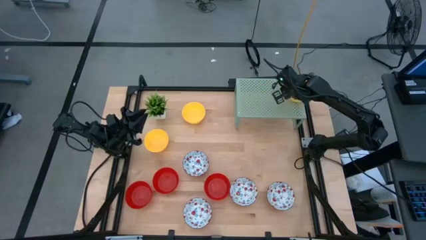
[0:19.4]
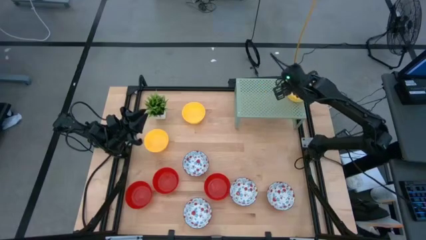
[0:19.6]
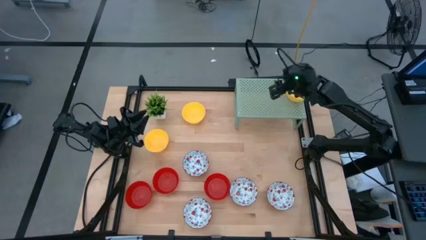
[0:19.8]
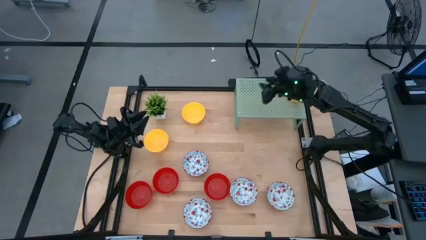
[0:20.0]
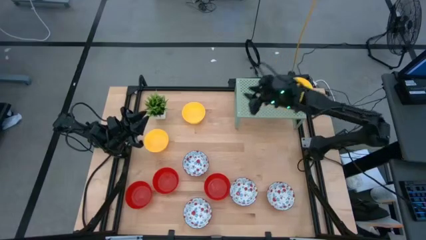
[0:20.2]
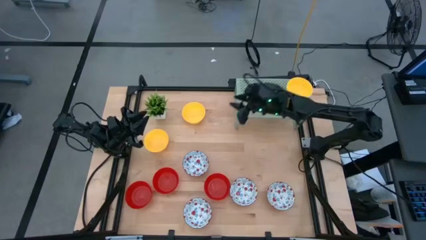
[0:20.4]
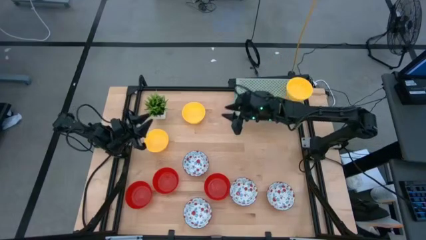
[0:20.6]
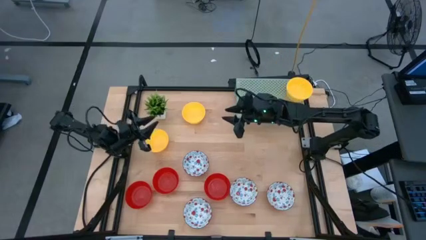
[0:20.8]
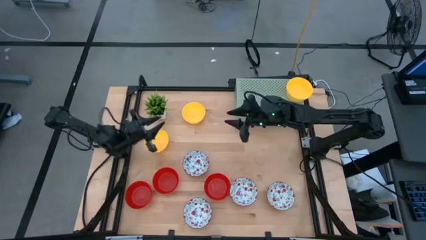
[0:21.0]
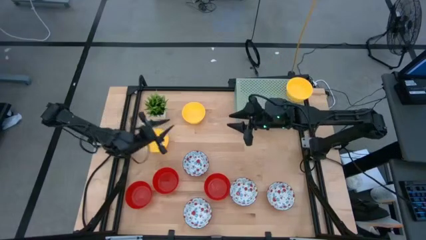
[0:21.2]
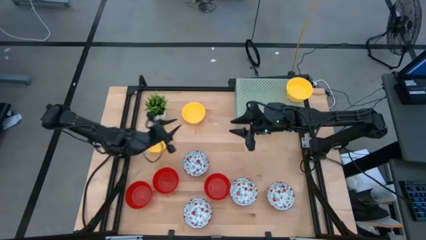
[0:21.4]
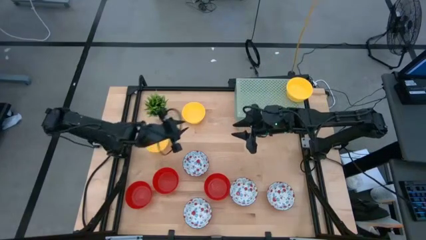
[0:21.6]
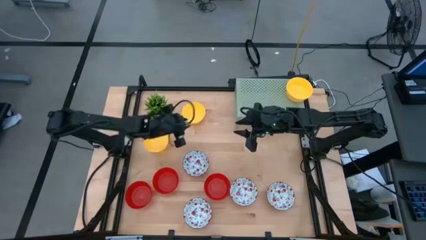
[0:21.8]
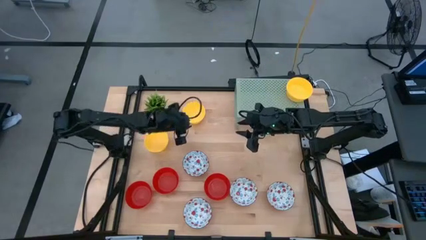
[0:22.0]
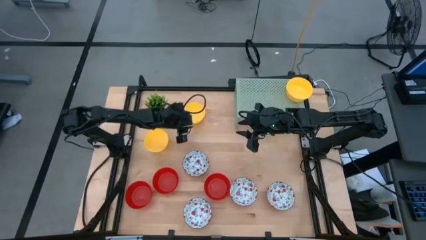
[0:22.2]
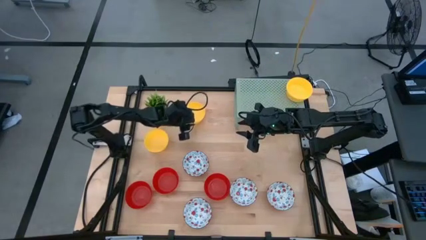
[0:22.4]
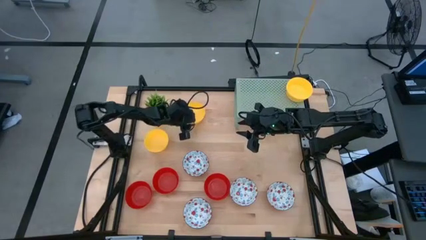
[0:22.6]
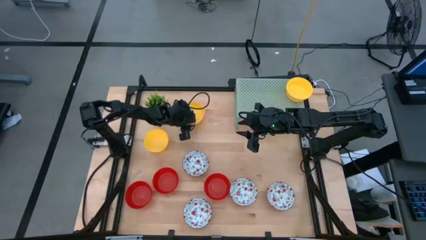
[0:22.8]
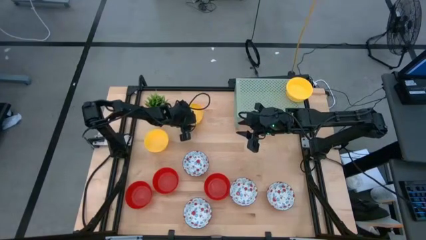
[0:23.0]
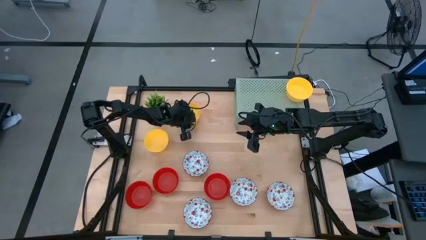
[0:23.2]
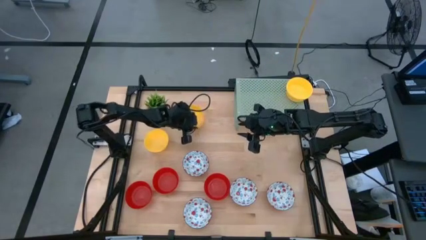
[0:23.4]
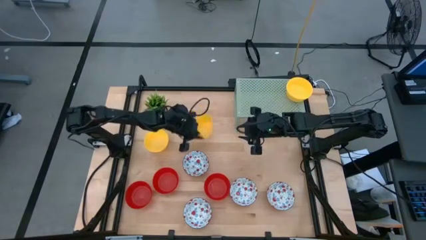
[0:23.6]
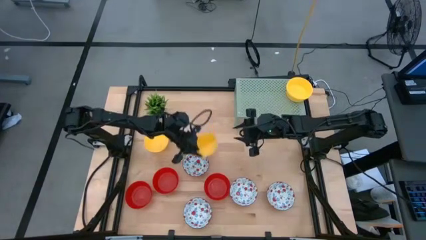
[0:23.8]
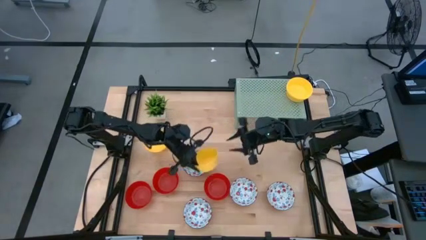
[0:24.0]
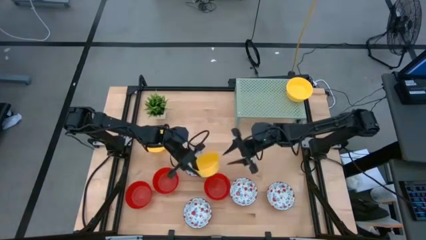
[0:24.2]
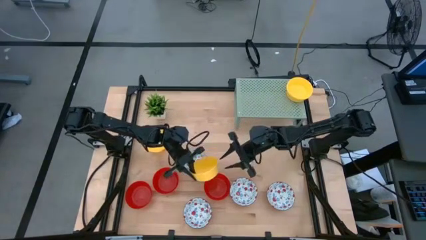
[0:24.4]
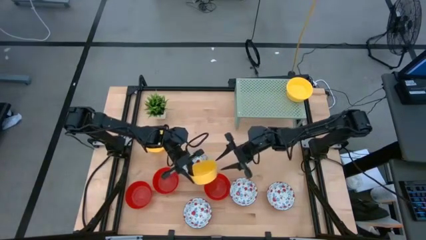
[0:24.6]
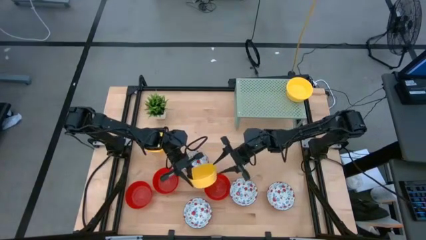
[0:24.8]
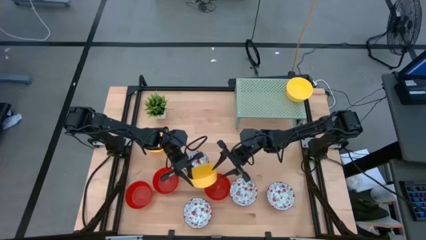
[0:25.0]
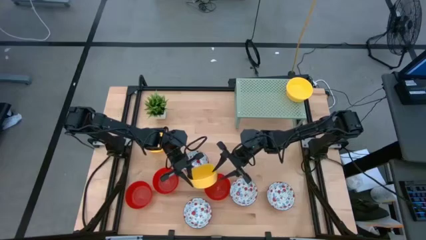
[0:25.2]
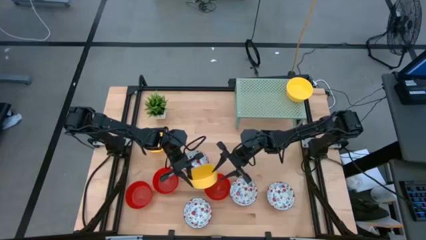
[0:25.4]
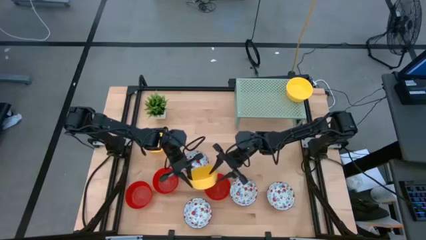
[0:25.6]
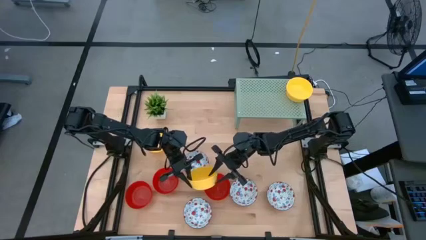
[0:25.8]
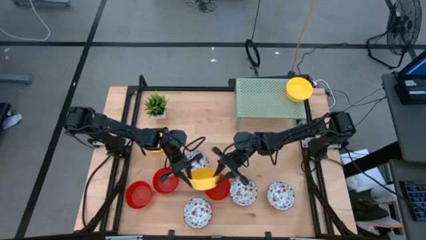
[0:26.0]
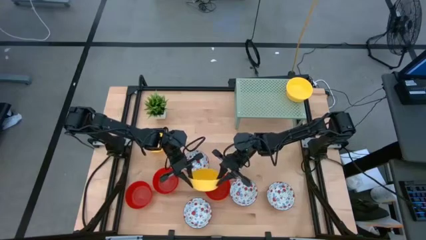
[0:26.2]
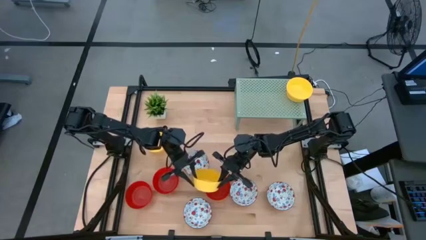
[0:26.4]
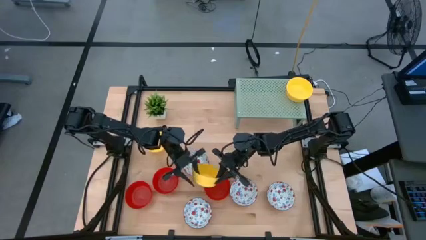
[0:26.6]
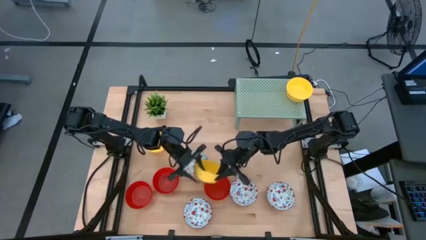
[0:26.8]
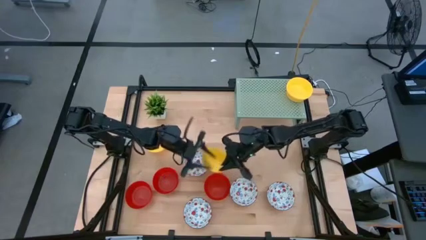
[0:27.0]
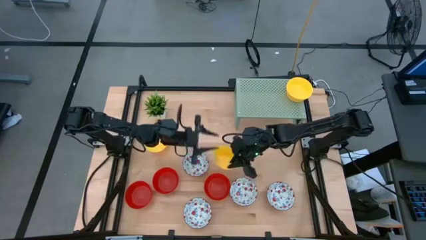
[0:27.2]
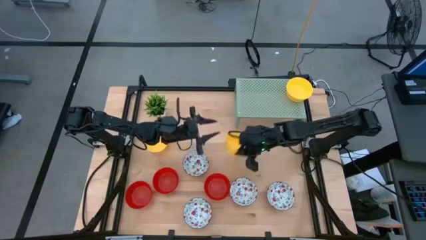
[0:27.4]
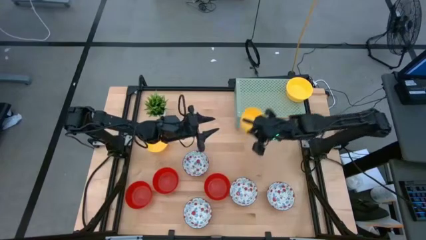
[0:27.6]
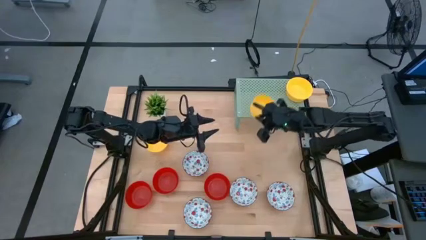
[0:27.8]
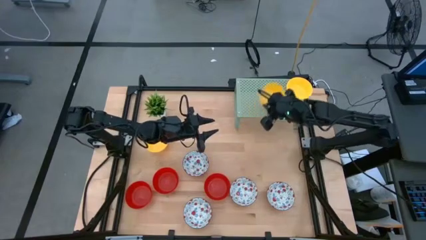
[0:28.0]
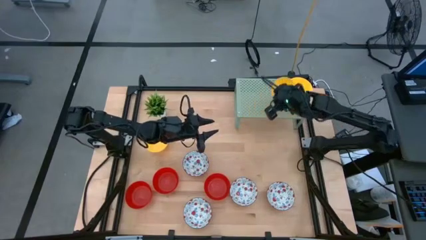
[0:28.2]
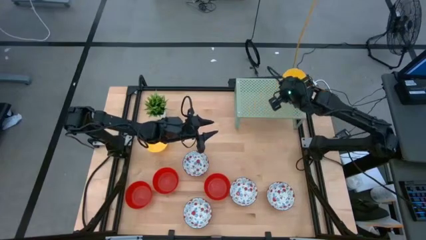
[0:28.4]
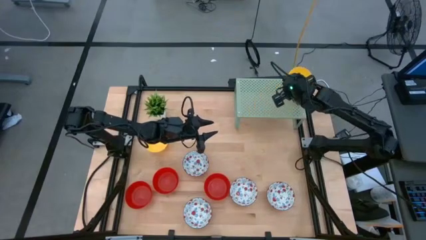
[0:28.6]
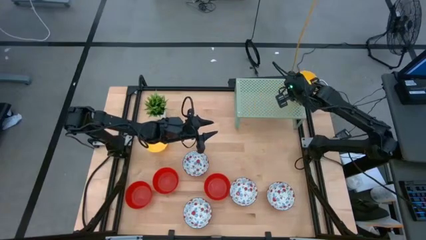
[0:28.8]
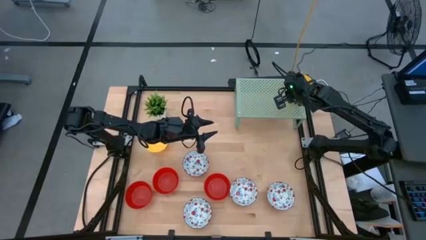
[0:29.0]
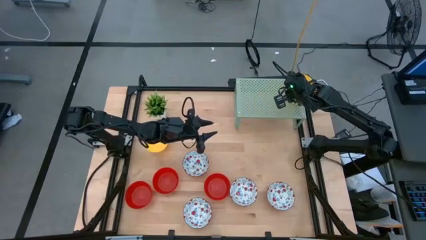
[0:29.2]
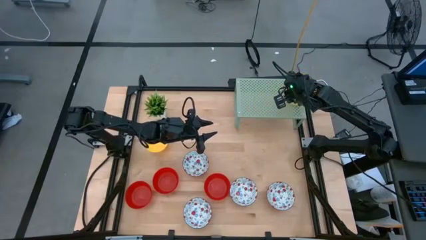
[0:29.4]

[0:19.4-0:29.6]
Task: Pick & Place Mini bowls
Stack the yellow bowl on the stacked yellow bowl on the shelf

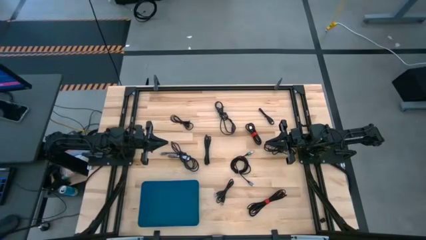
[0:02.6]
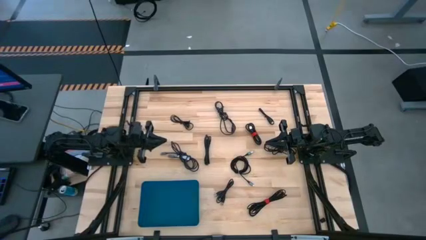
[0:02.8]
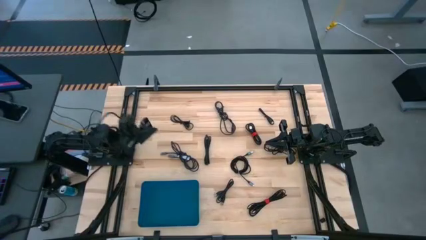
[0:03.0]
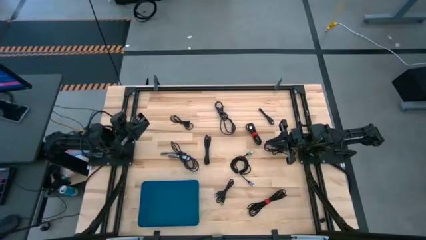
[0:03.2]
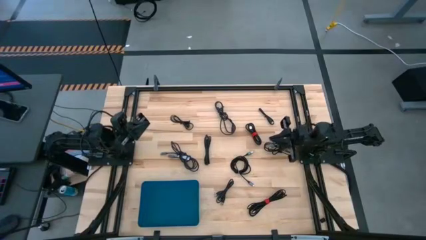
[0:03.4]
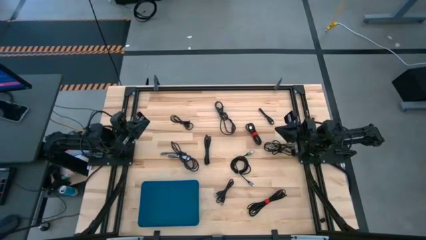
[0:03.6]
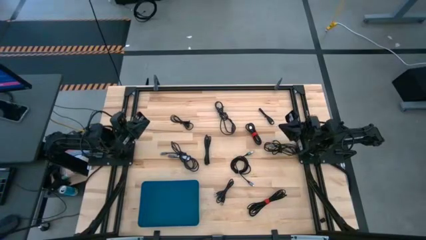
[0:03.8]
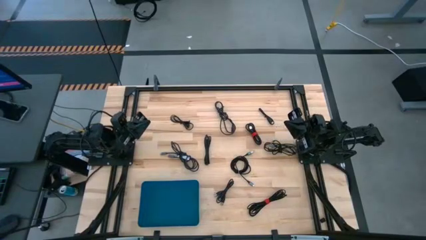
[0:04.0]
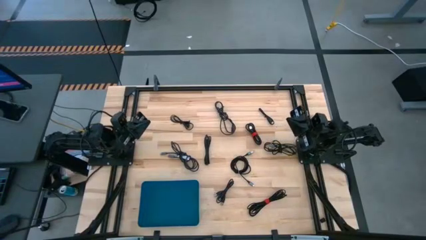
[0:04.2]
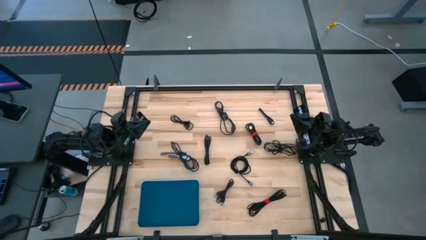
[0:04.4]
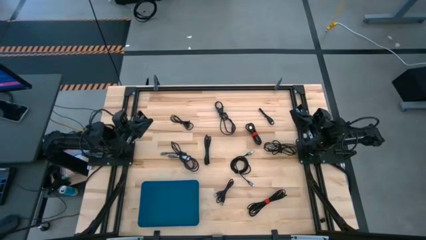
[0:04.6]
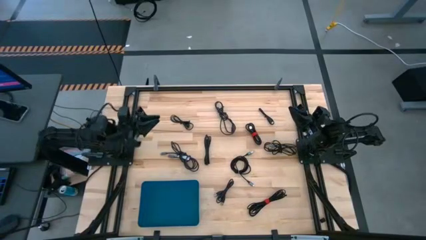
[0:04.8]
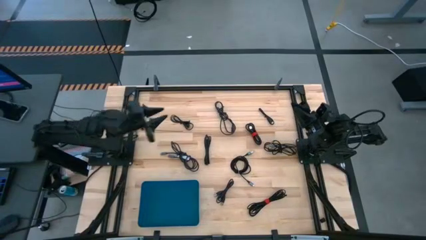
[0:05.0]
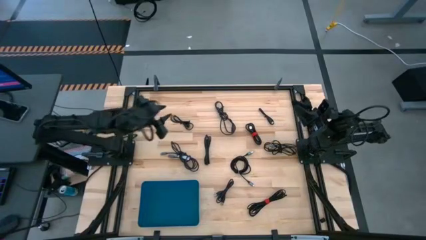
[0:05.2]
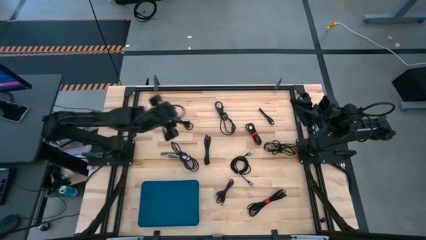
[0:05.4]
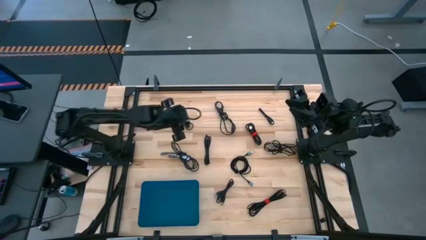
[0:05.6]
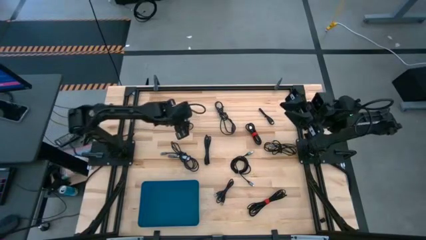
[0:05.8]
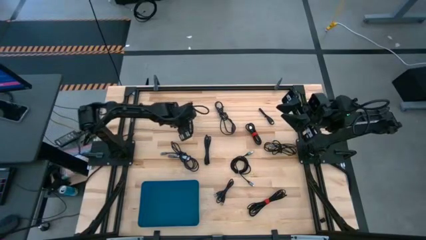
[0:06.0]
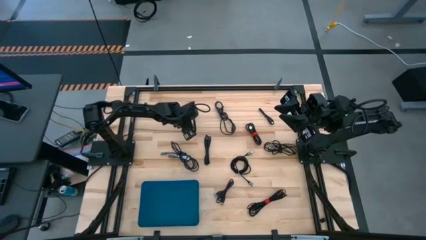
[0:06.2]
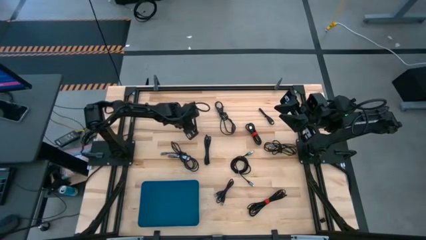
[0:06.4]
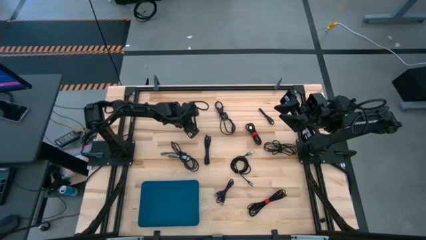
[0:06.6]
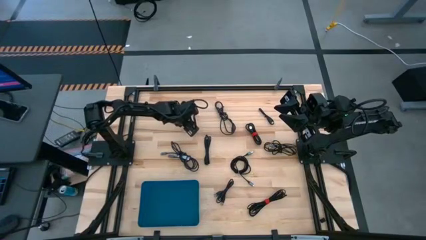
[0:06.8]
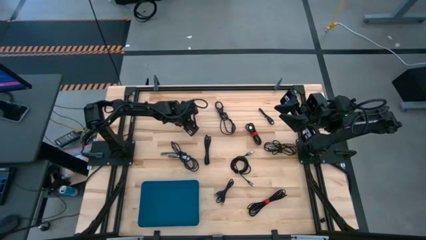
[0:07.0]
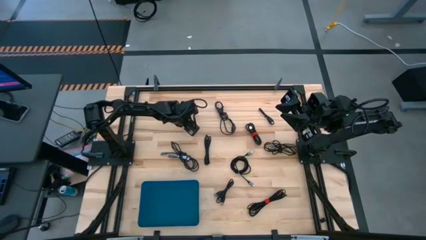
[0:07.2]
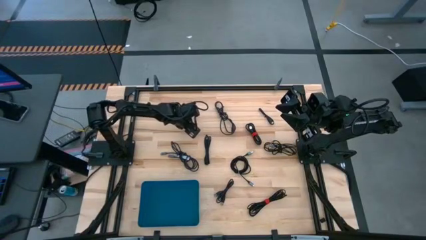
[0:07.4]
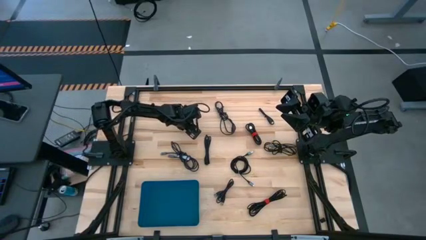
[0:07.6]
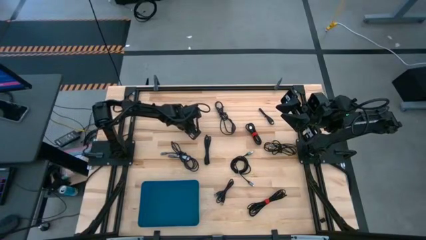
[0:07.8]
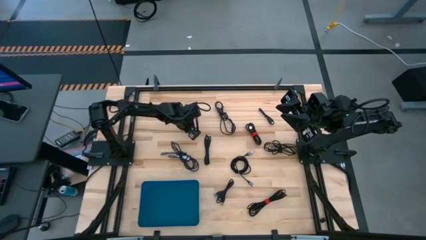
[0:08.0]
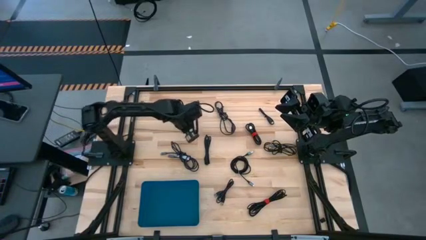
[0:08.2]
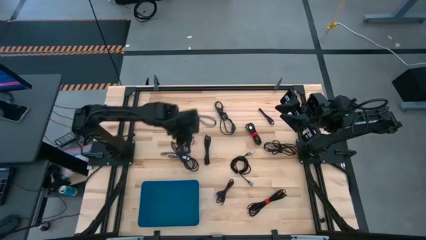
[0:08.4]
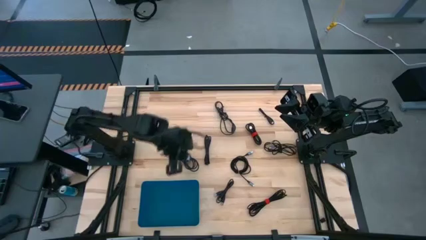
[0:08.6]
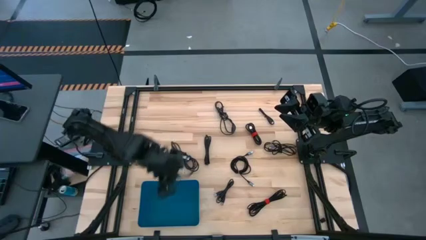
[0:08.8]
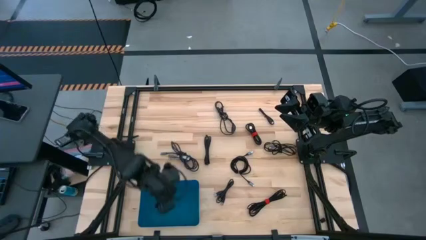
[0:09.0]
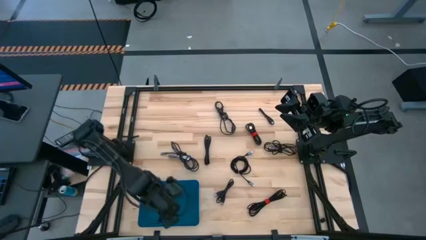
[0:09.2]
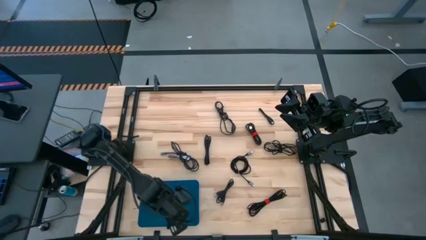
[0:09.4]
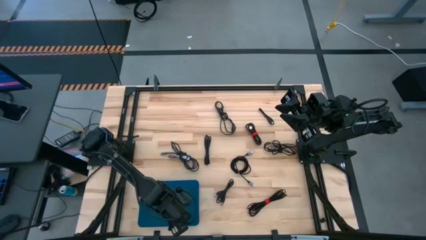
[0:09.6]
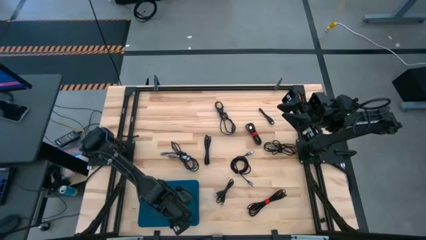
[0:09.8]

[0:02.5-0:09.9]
Task: Pick and place USB-C Cables
Put the black charger cable into the blue bin
